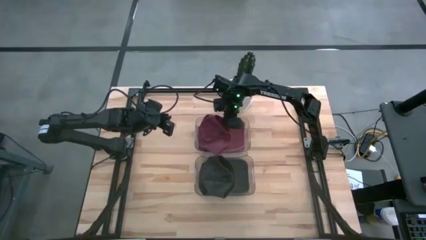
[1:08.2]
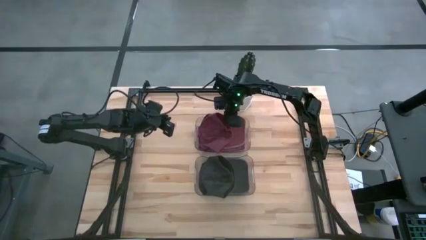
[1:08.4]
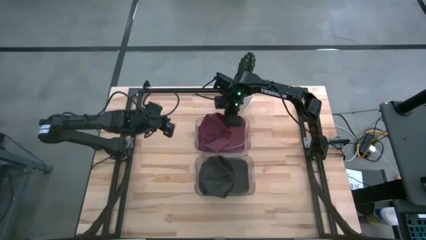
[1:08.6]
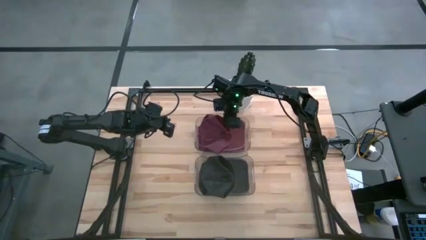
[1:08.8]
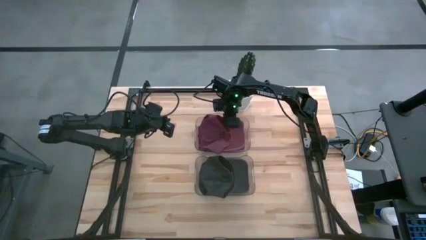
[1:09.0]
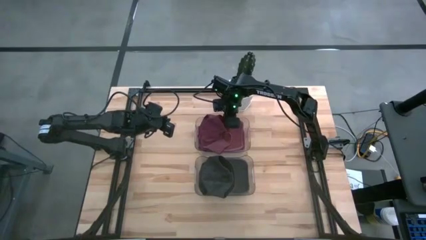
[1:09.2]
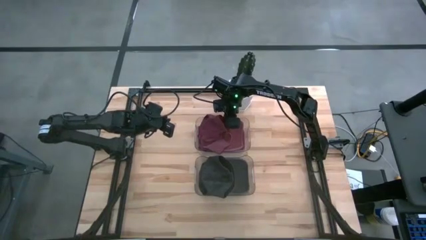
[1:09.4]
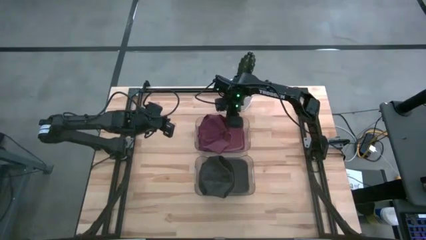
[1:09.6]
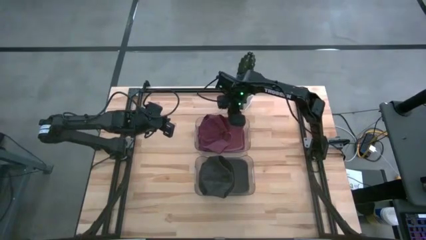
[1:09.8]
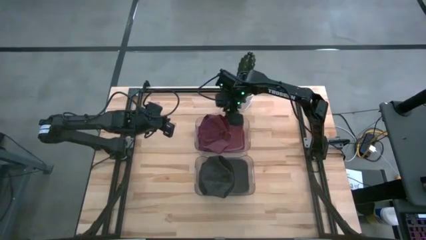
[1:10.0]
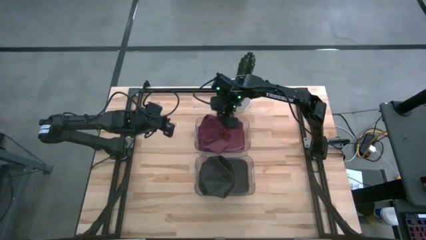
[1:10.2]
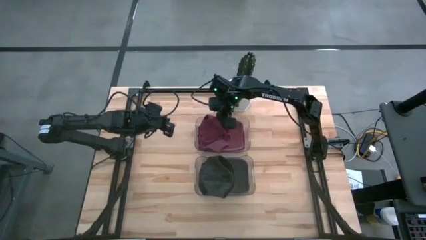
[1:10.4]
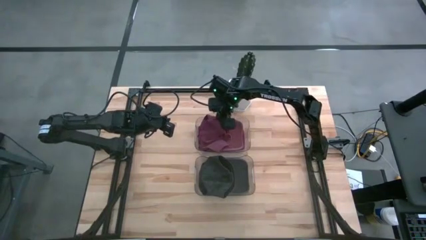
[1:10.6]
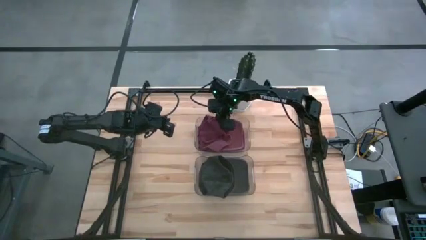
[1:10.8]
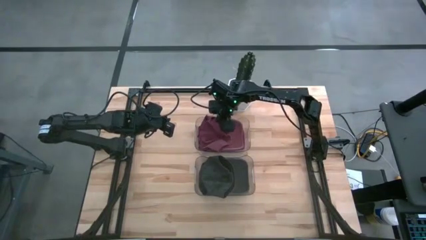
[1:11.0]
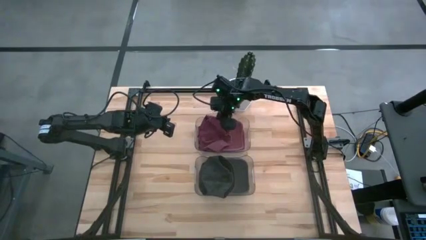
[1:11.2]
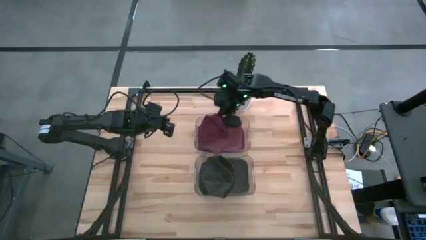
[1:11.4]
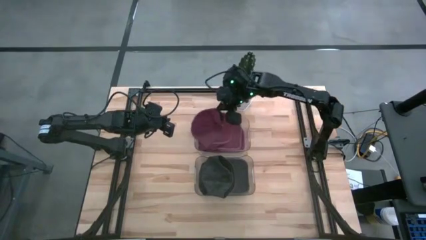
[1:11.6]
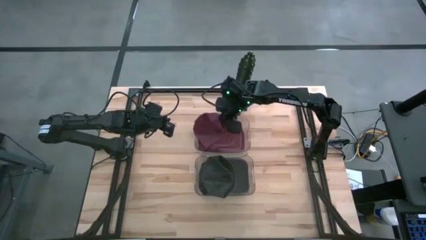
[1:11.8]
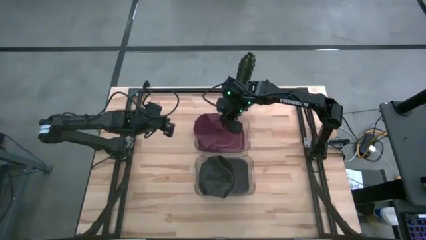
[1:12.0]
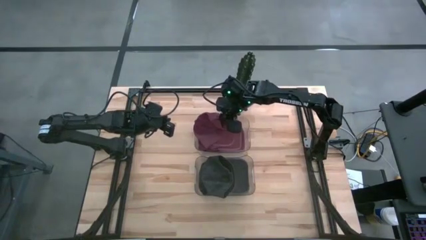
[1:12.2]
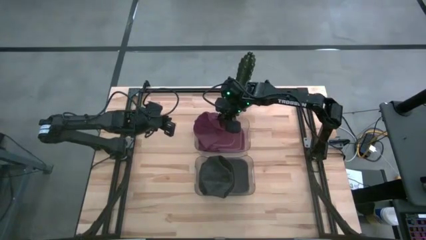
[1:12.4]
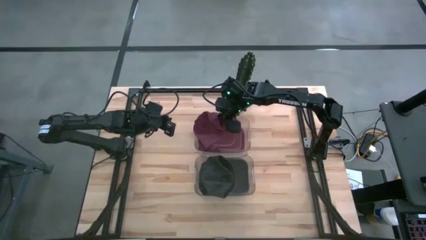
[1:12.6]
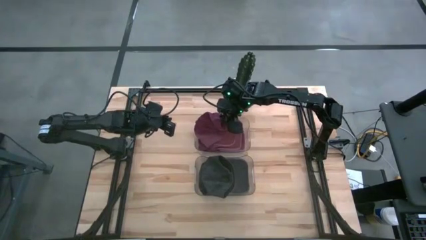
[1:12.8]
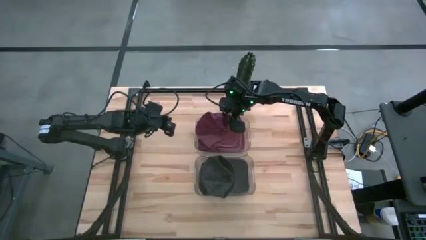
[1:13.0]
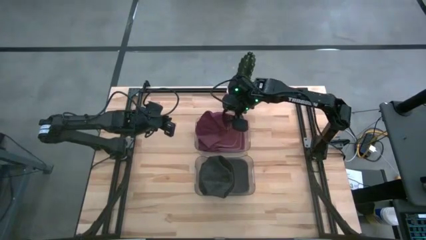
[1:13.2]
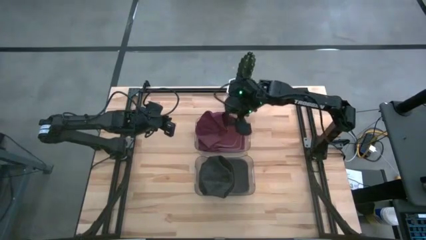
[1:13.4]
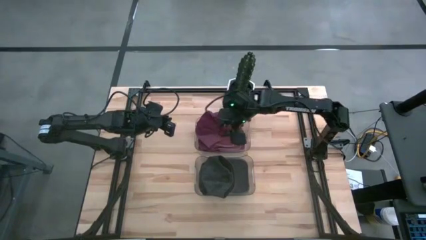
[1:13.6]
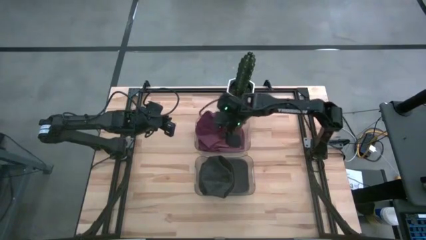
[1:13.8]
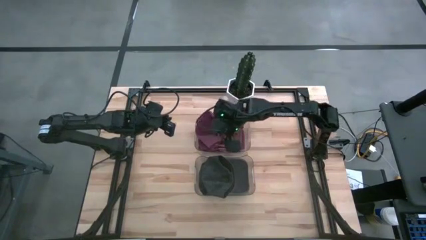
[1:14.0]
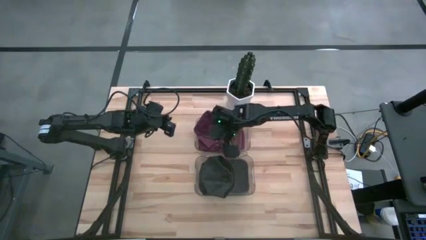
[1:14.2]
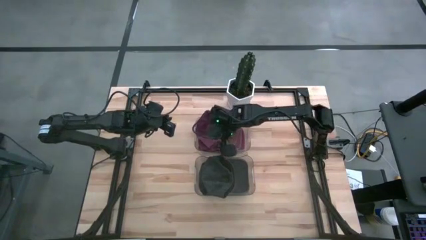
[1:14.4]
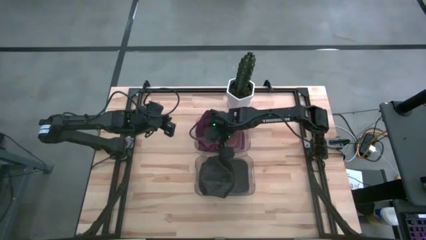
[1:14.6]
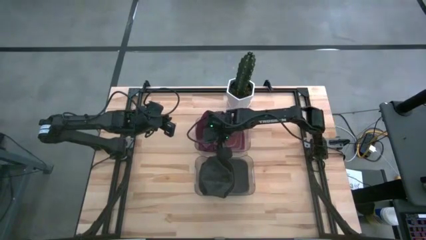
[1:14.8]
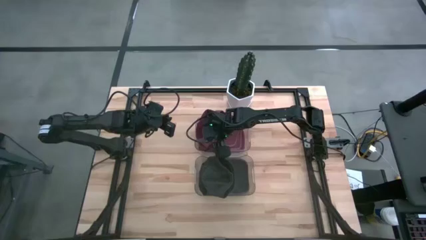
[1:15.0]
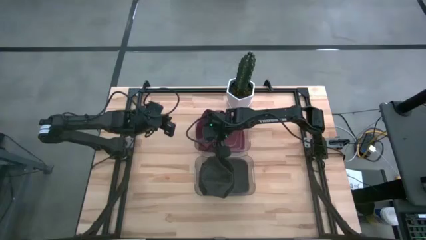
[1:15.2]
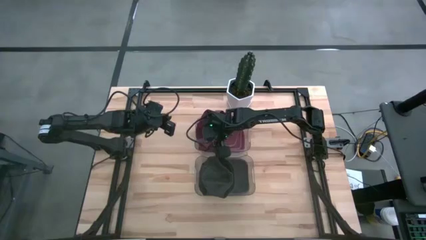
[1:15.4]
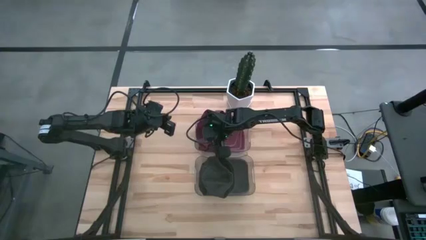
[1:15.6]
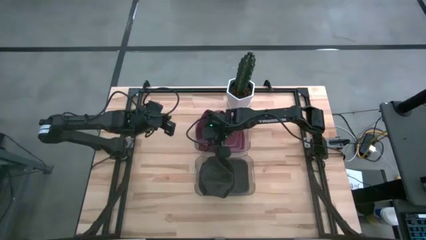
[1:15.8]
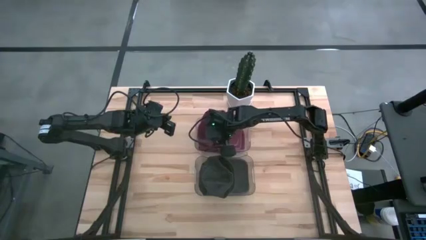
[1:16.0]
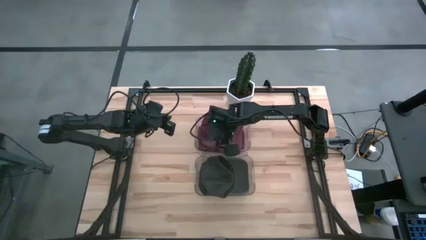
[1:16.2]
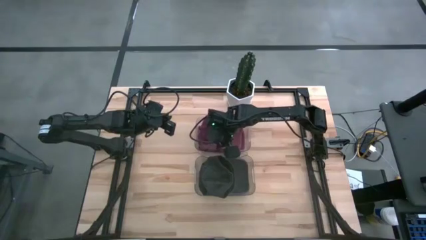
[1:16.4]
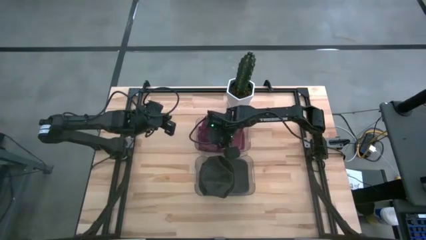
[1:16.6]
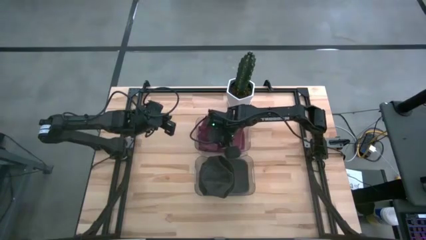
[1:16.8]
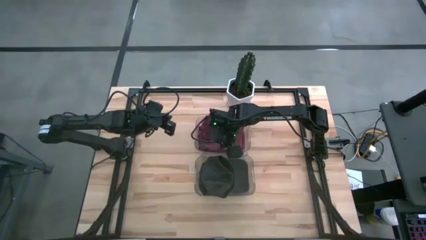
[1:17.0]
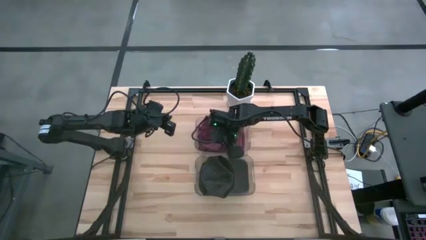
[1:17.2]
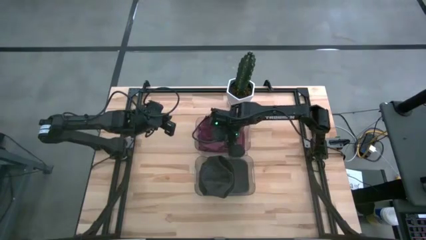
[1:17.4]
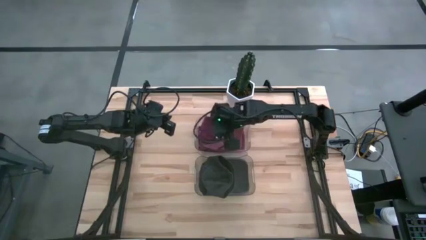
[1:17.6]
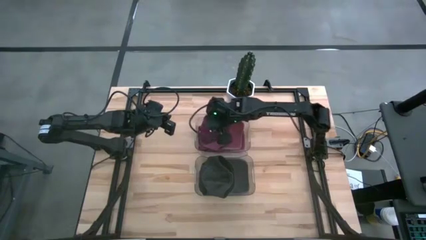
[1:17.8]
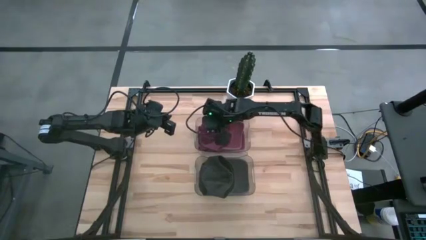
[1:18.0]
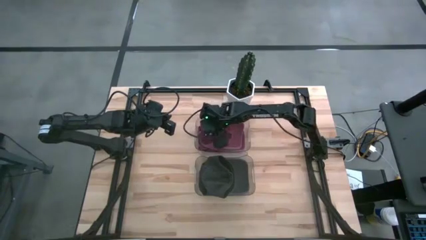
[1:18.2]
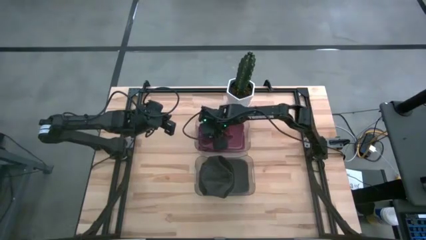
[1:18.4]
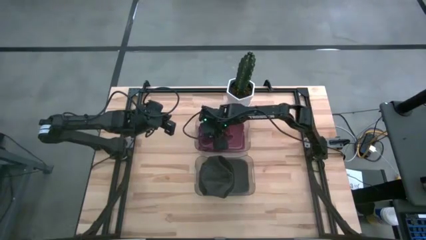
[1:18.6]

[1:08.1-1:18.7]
Task: Pick & Place hat
Put the red cap into the top transparent bin

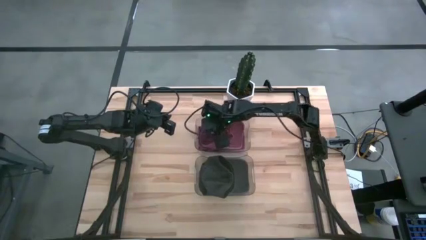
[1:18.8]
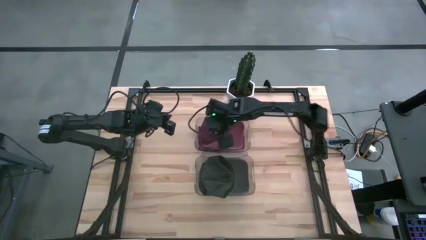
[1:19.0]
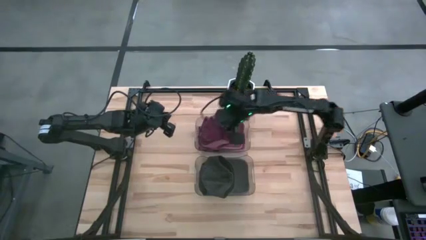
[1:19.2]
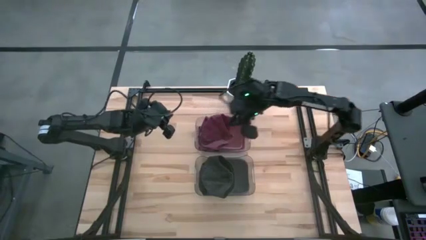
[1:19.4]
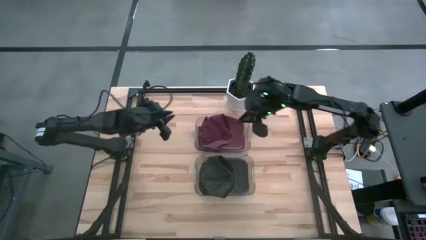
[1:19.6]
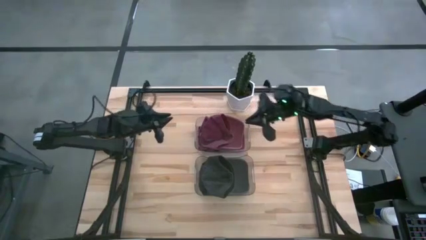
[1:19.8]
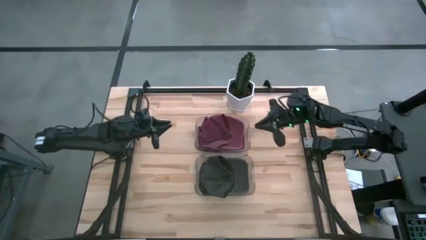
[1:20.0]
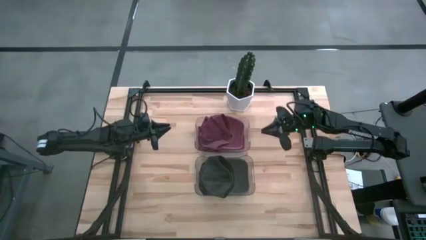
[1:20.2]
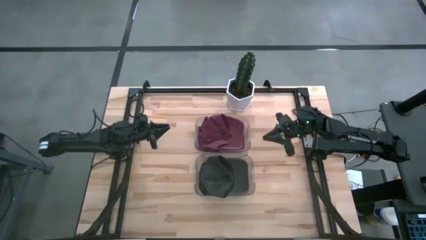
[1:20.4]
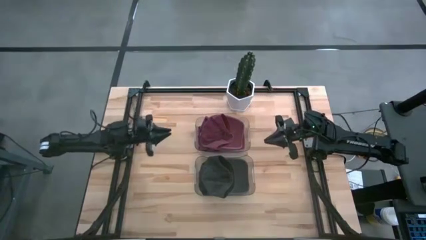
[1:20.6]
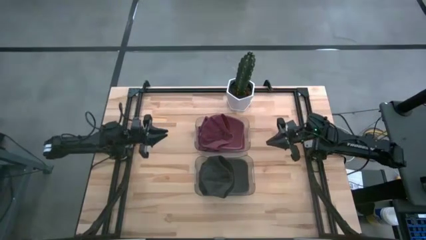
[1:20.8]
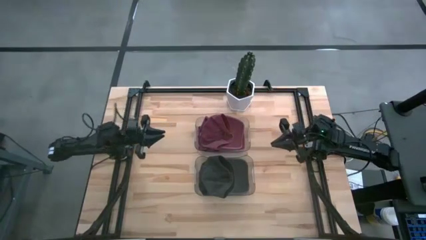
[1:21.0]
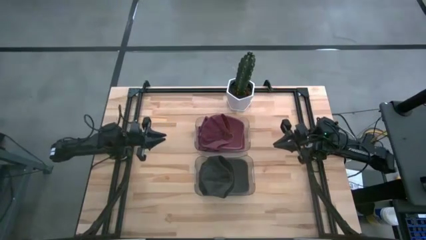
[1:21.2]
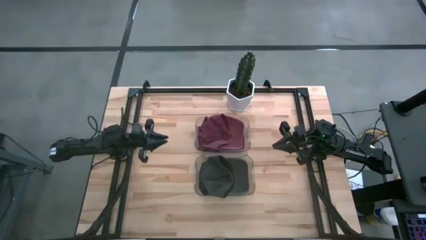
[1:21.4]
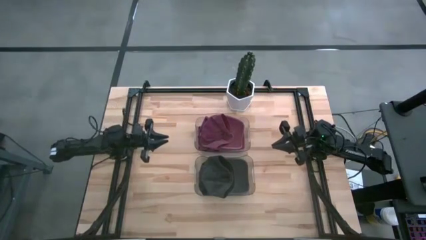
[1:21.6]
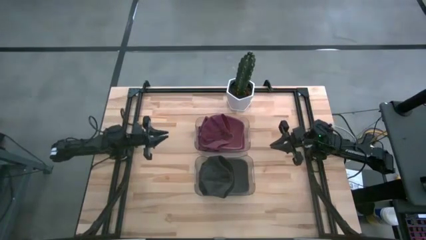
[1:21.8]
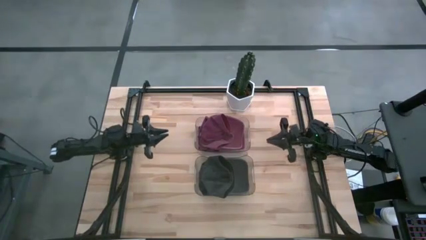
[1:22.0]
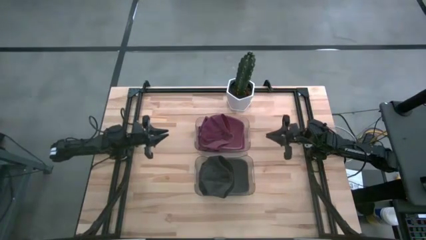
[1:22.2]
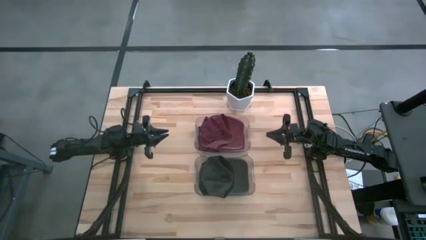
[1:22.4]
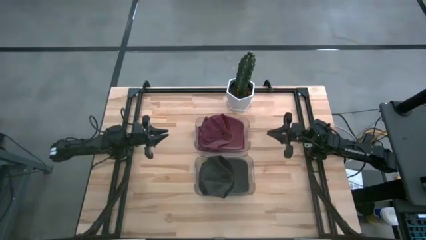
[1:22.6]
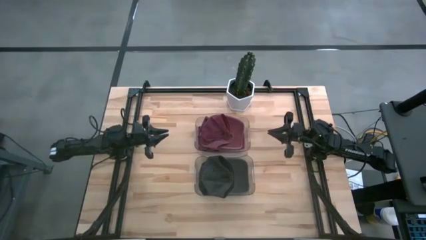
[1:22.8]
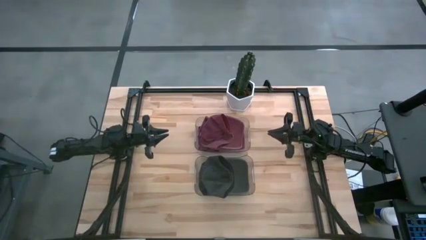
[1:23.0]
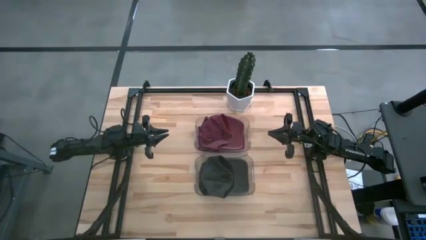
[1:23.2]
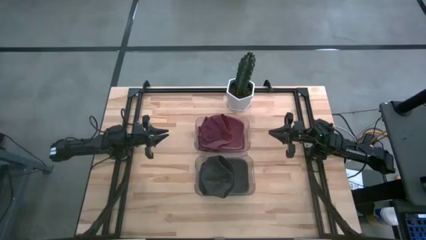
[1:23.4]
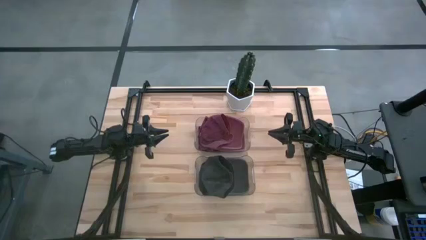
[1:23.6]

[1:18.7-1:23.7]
Return to Home Position
